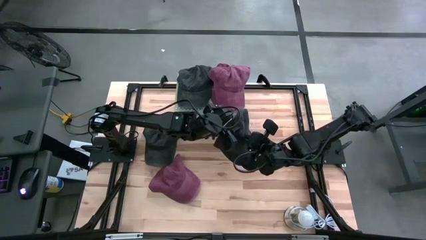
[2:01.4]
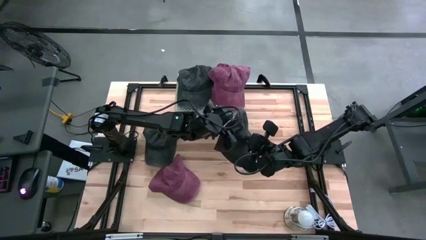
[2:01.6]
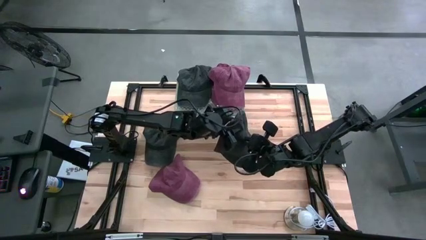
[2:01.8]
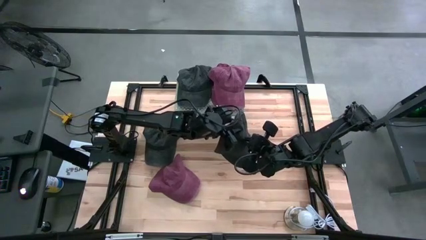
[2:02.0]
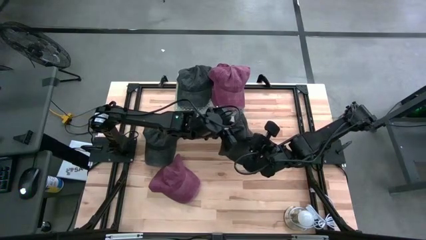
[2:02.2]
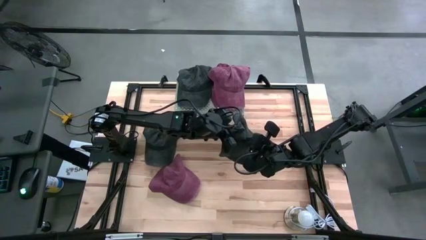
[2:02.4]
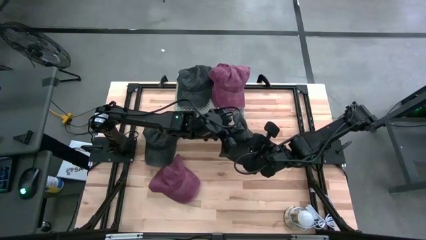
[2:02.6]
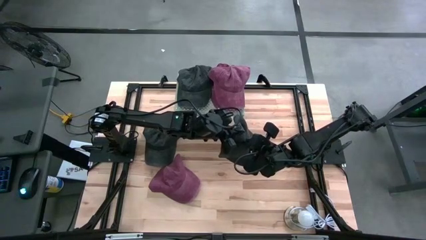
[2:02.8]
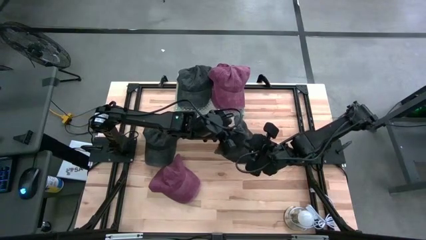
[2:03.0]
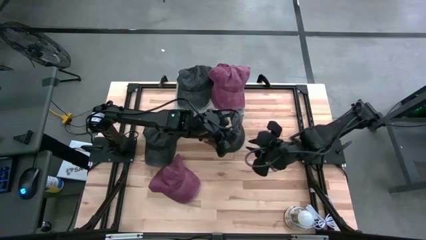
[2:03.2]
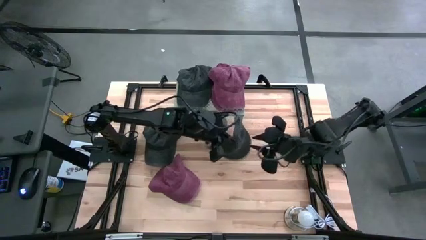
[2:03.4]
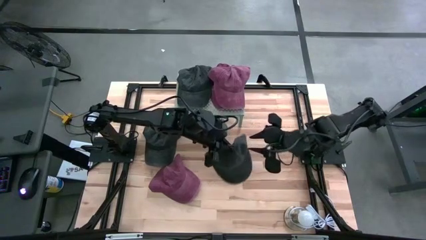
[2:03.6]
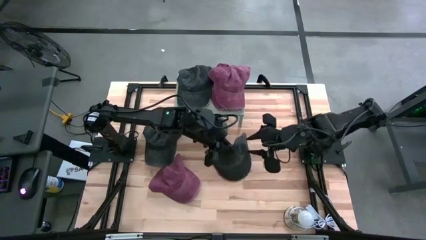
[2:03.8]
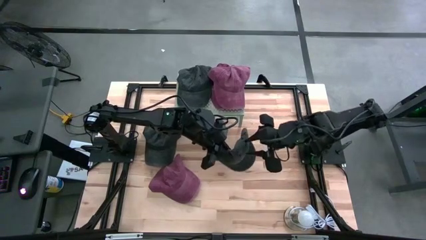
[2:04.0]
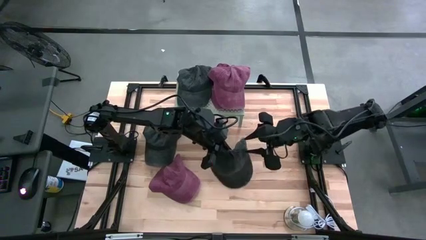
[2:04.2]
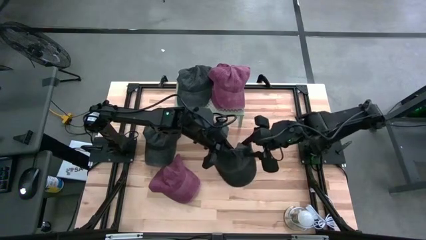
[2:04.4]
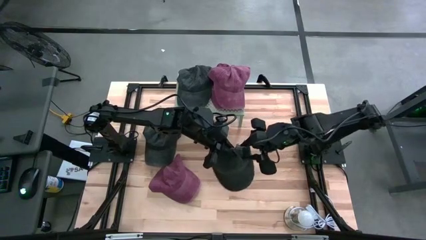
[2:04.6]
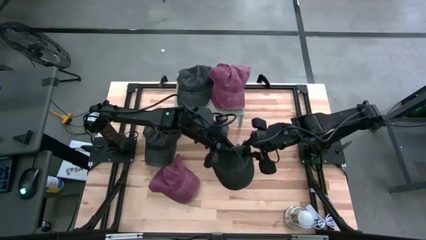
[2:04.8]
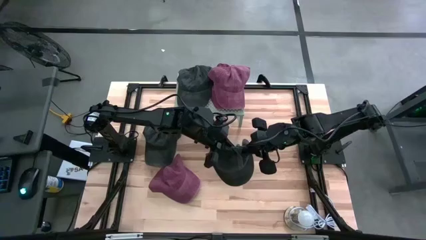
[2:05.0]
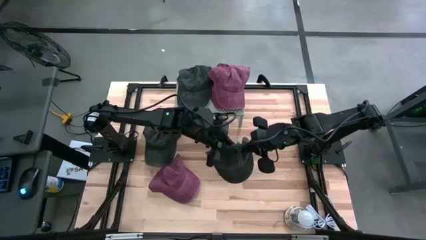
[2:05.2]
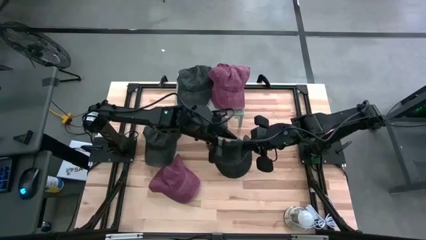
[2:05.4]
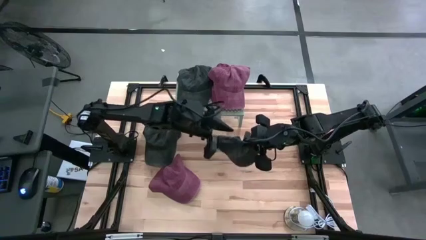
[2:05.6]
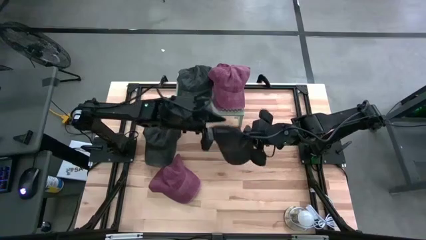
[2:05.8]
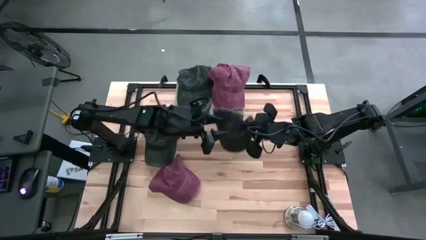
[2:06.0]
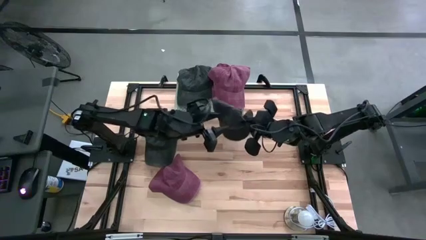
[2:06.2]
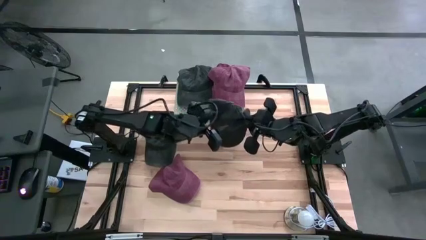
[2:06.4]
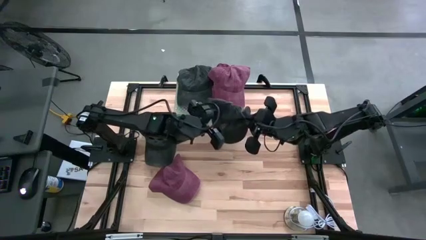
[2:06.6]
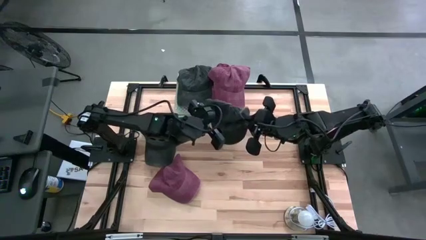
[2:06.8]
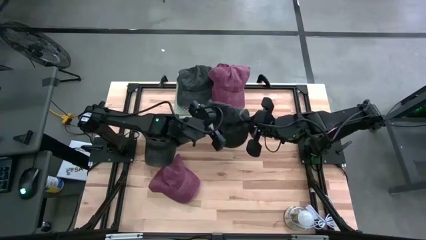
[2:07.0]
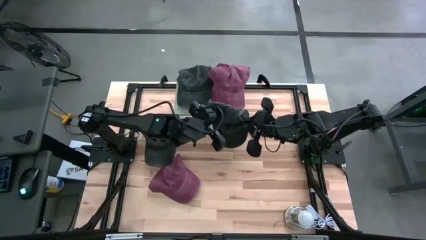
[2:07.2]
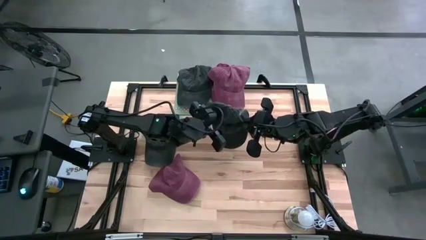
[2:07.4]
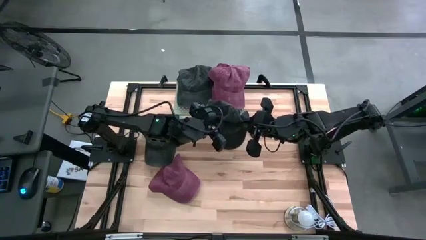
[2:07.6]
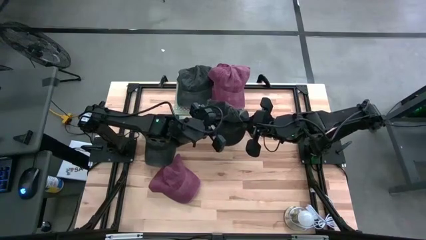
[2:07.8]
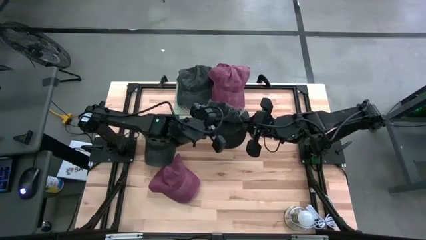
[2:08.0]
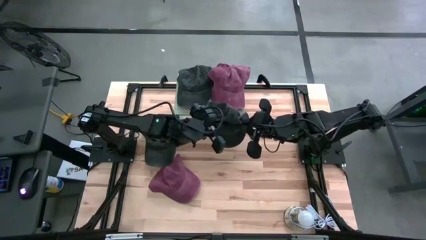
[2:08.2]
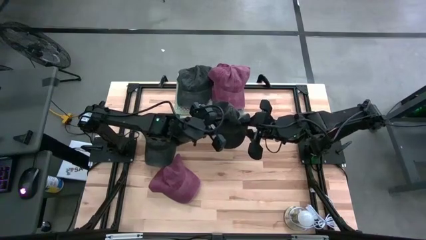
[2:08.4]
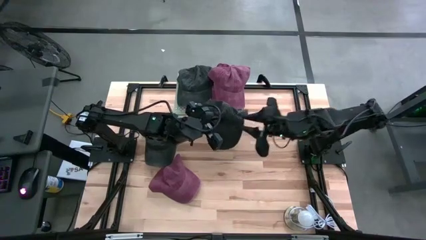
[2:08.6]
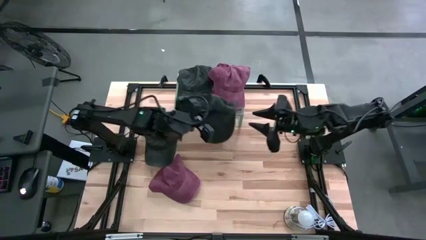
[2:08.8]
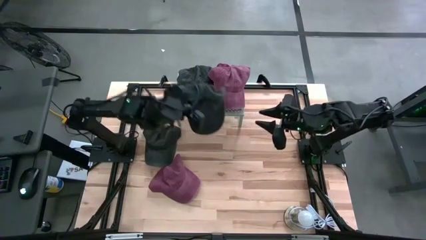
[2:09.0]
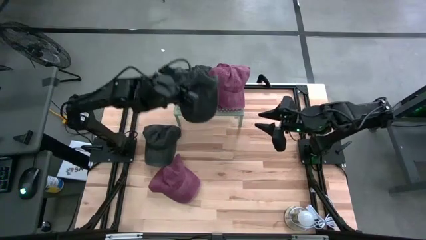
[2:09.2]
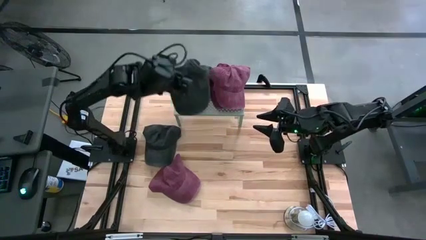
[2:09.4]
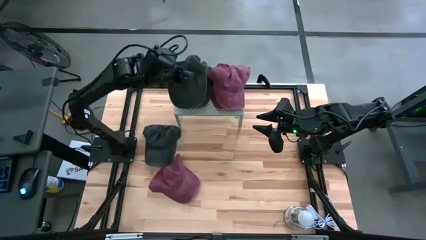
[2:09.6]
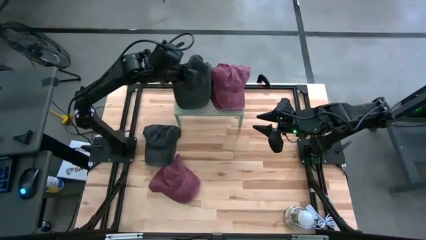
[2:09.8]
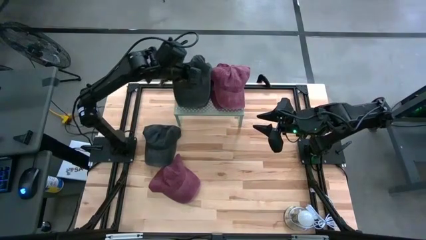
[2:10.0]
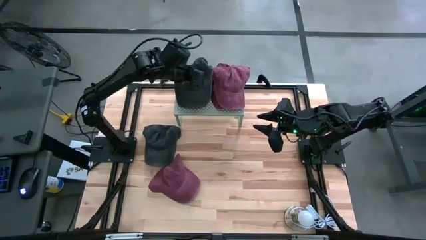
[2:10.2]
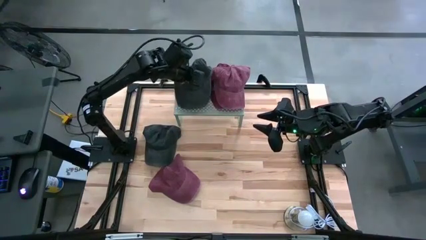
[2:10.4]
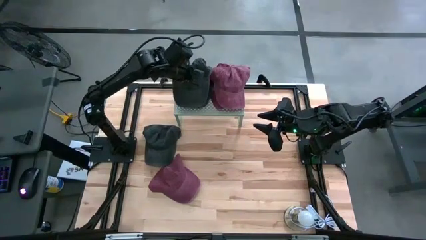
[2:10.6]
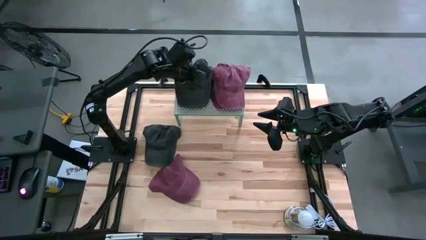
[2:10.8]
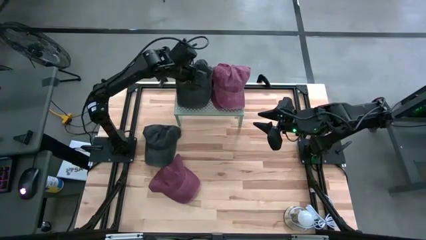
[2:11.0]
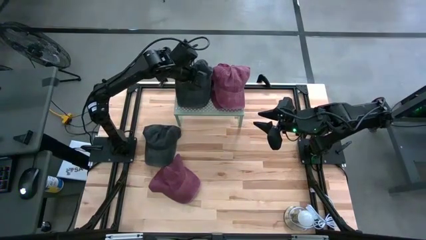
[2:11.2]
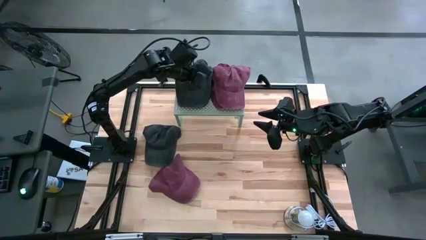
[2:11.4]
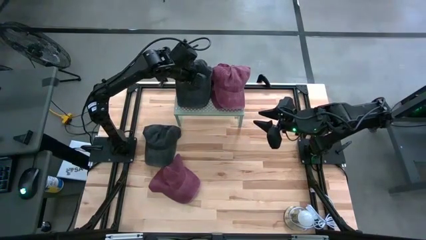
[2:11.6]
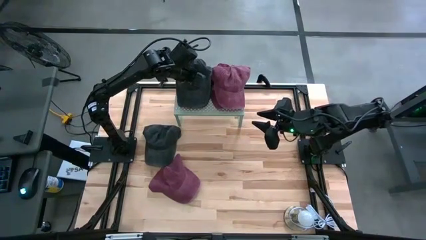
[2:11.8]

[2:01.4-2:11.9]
Task: Pick & Place hat
Stack the right black cap on top of the black cap on the shelf

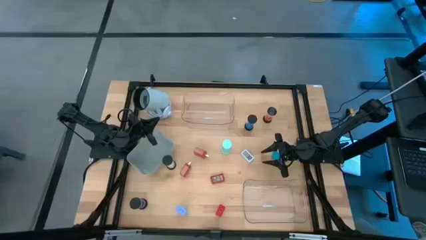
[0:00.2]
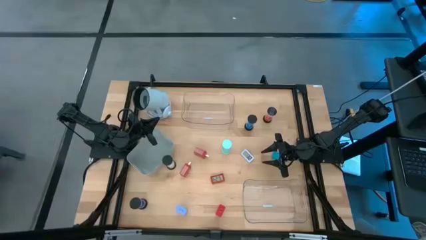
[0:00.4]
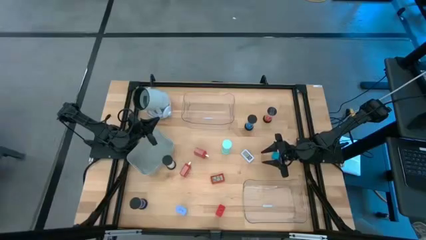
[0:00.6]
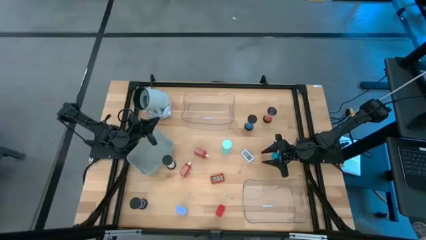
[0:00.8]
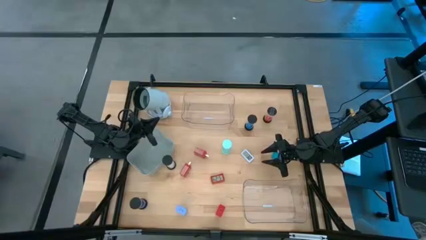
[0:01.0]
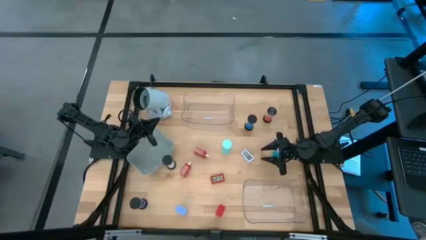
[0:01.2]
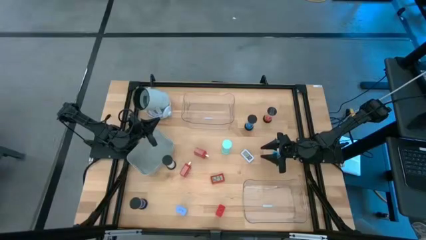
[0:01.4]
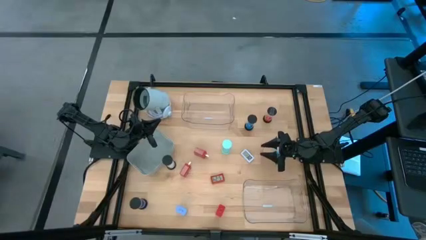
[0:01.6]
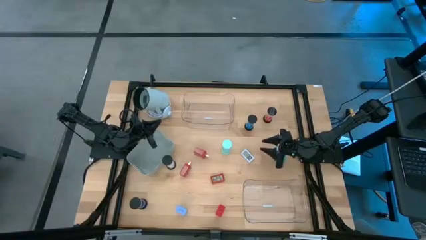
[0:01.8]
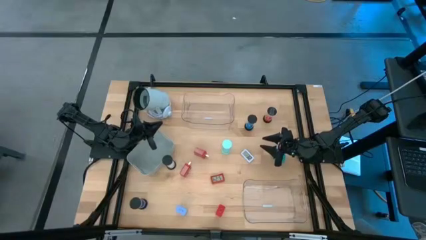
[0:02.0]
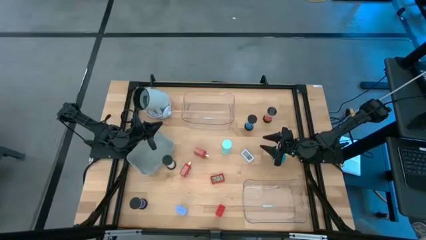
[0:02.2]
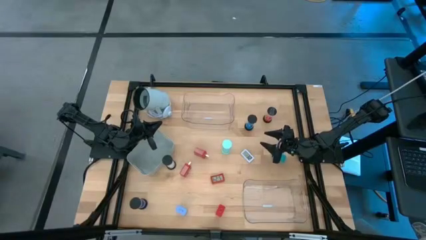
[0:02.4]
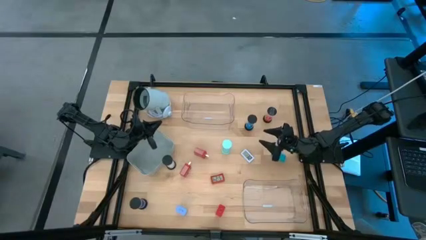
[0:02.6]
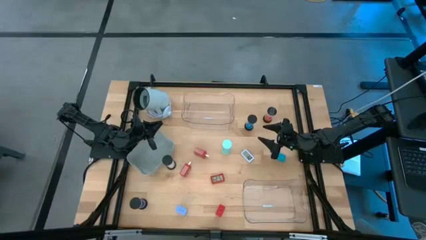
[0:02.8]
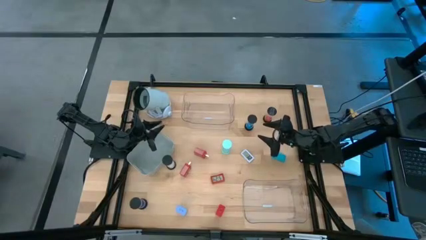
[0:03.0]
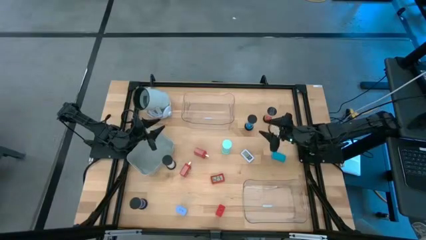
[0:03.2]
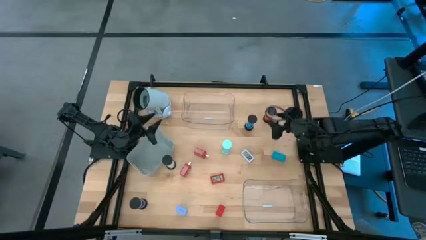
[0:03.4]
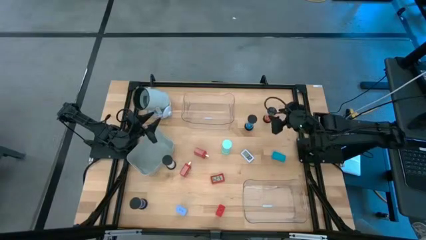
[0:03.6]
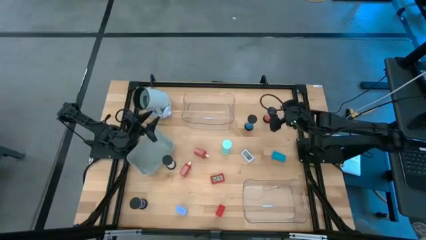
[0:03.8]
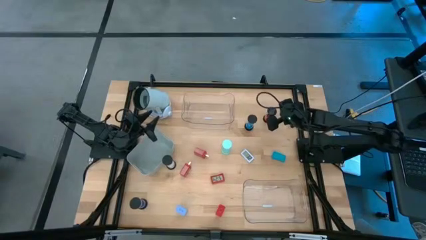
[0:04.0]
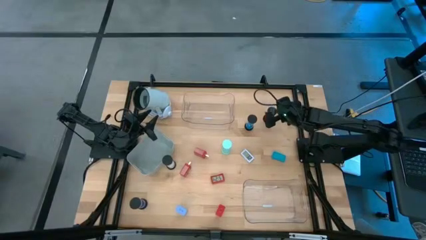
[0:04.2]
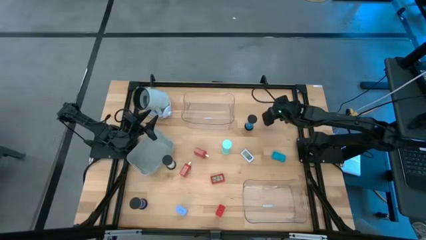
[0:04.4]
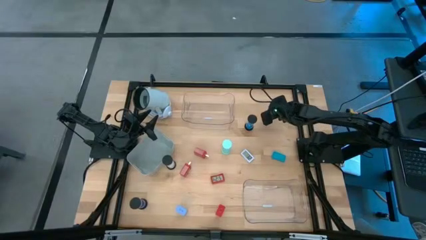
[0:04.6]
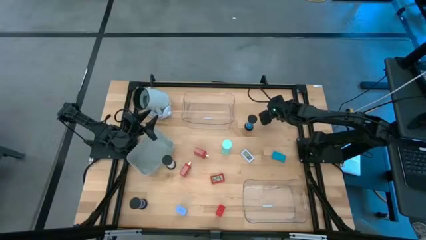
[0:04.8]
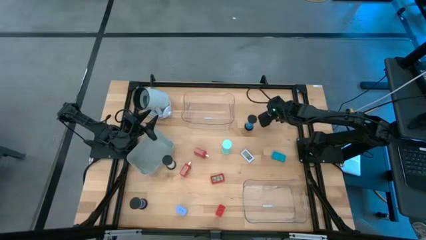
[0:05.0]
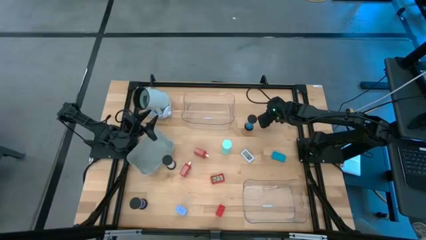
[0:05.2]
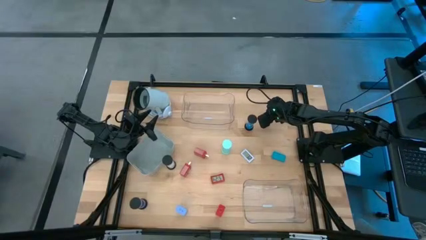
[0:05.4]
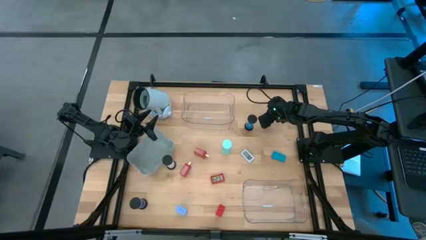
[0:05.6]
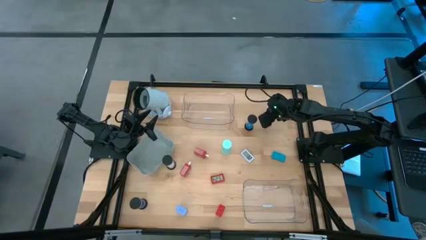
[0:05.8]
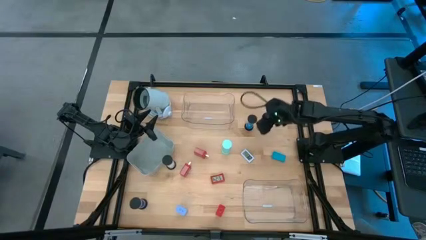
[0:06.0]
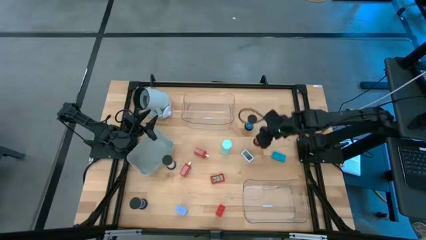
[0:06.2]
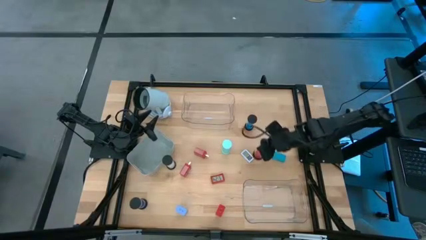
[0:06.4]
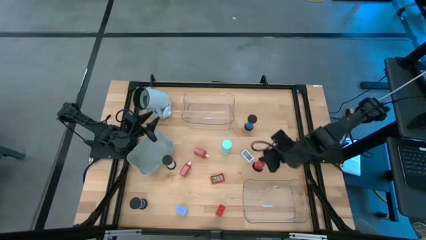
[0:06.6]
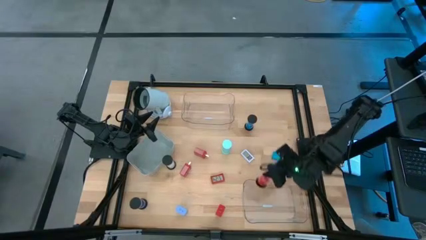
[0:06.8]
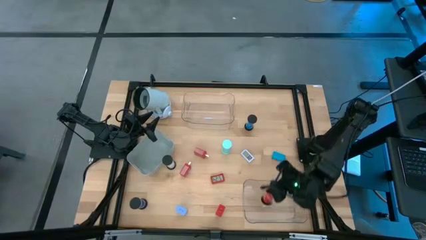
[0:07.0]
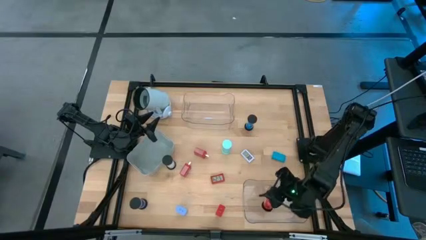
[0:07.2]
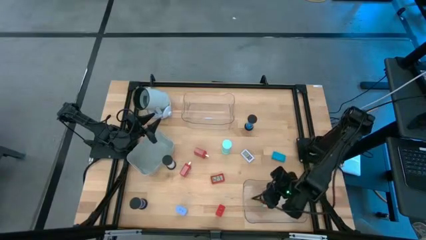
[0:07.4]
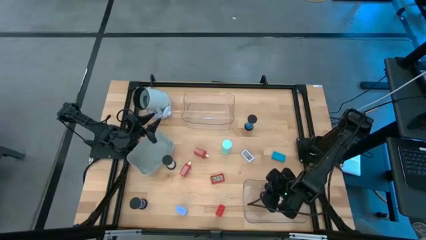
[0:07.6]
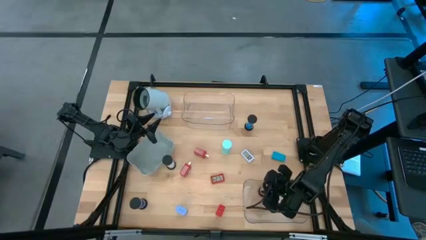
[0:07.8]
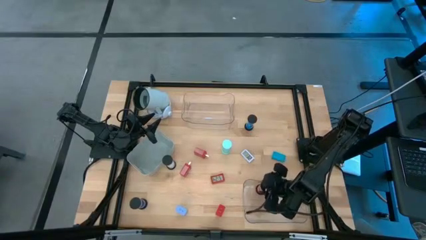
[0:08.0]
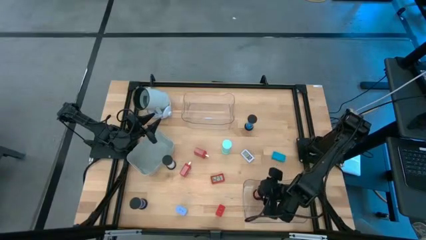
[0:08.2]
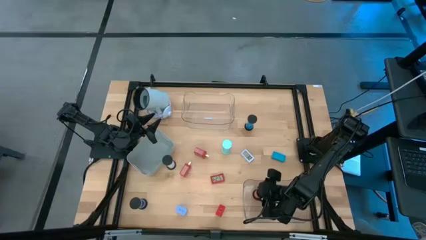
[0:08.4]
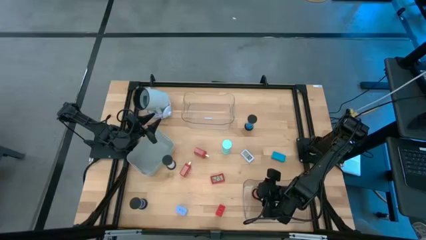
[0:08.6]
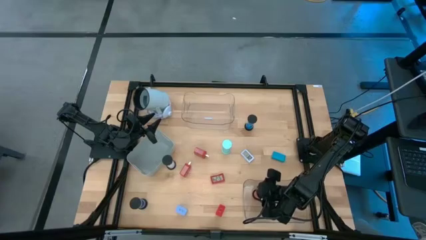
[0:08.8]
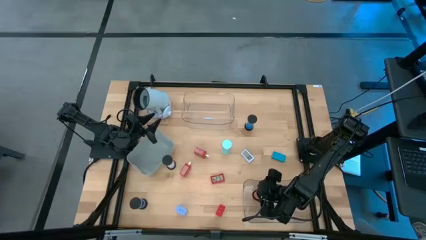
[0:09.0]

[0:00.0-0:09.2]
Task: Pick & Place Office items
Put the orange hourglass into the bottom transparent bin
